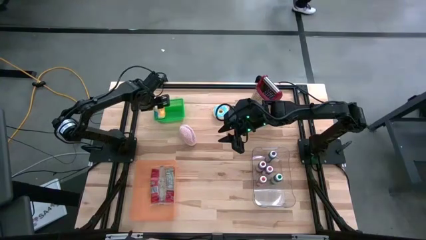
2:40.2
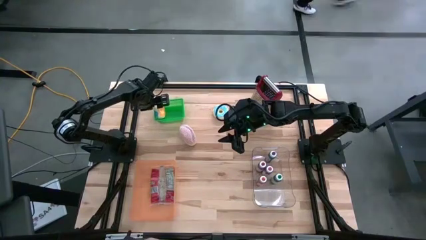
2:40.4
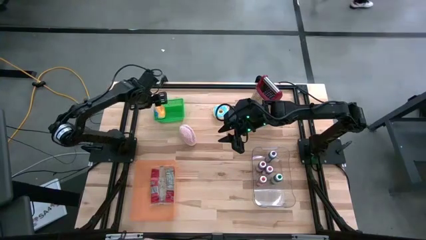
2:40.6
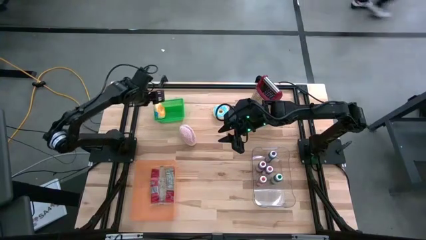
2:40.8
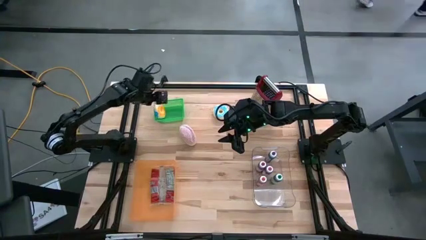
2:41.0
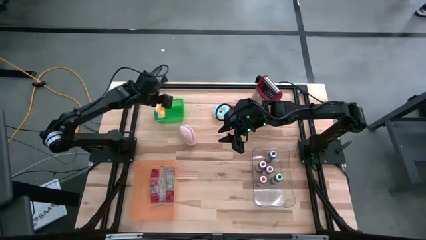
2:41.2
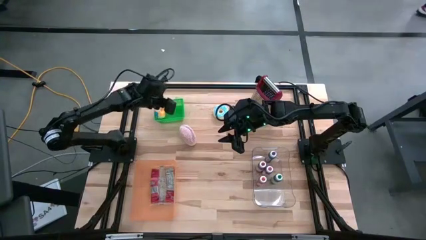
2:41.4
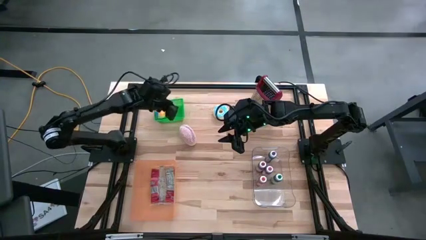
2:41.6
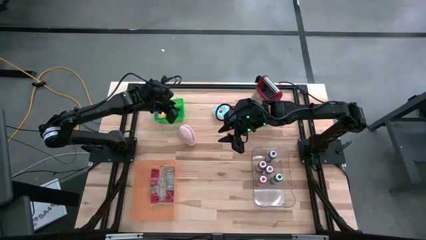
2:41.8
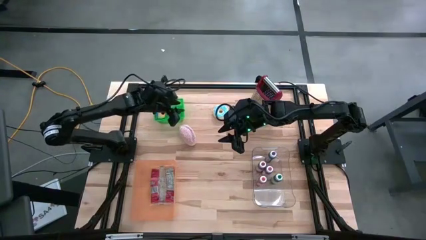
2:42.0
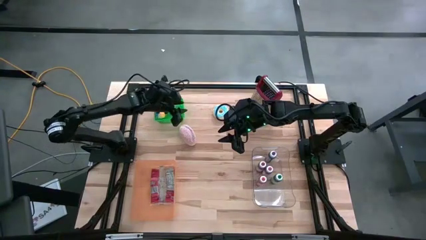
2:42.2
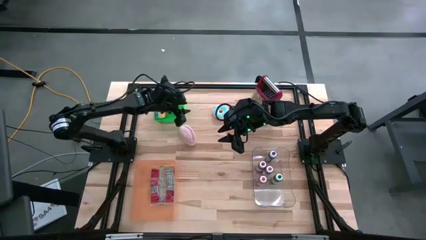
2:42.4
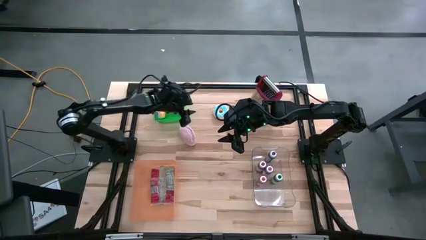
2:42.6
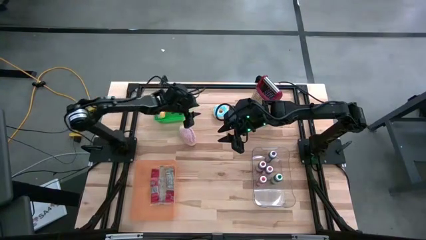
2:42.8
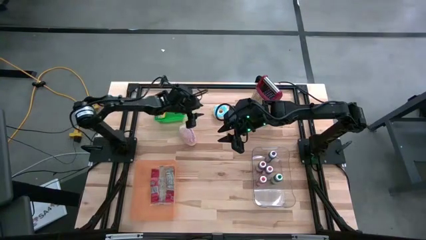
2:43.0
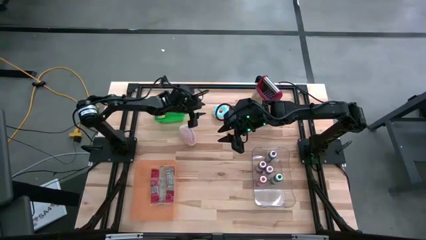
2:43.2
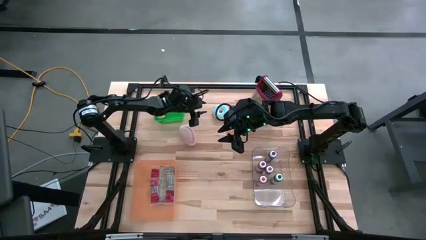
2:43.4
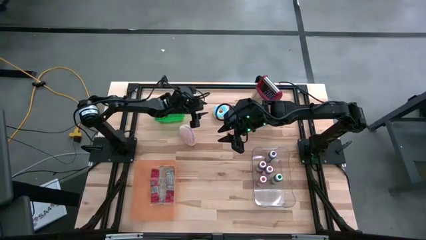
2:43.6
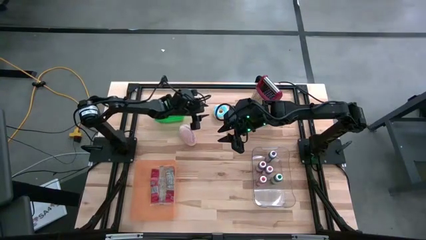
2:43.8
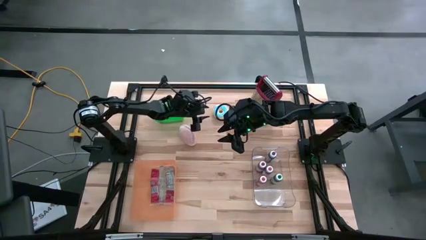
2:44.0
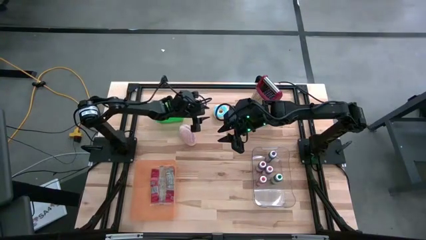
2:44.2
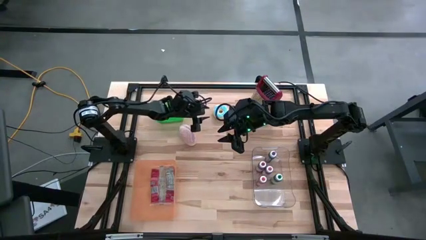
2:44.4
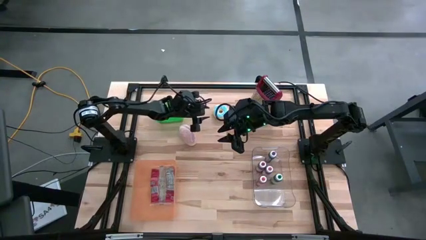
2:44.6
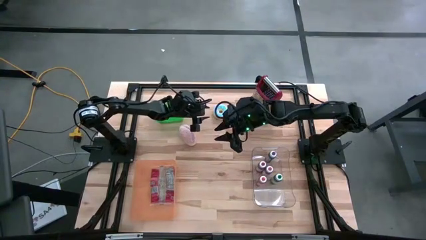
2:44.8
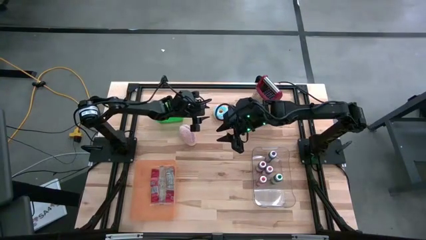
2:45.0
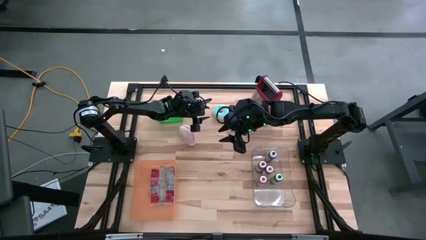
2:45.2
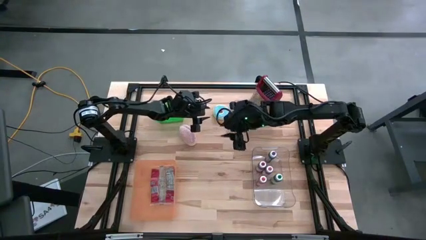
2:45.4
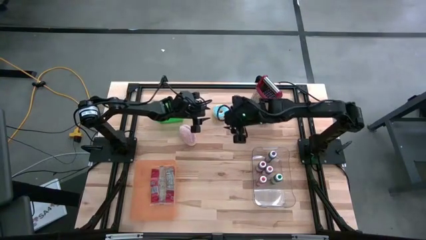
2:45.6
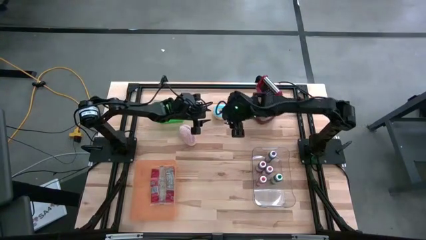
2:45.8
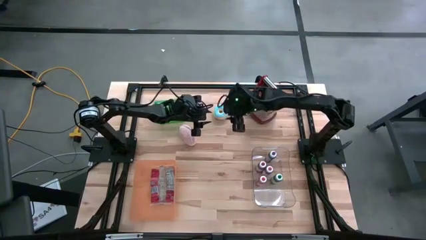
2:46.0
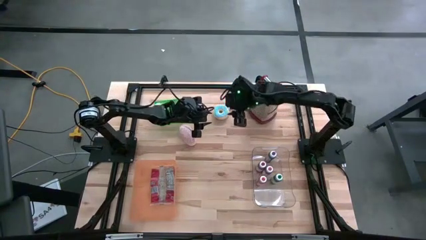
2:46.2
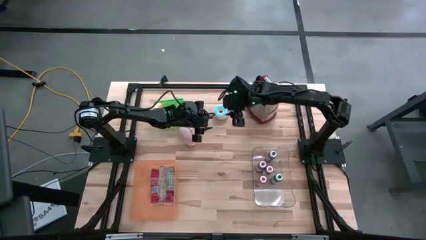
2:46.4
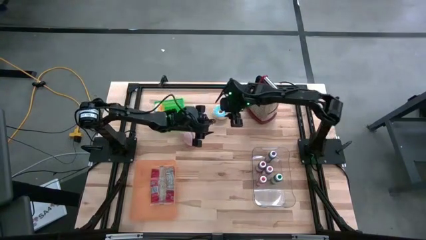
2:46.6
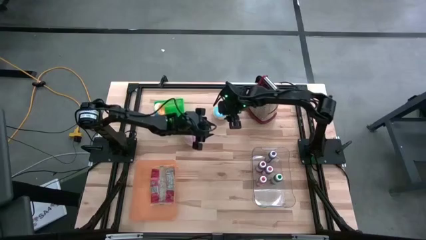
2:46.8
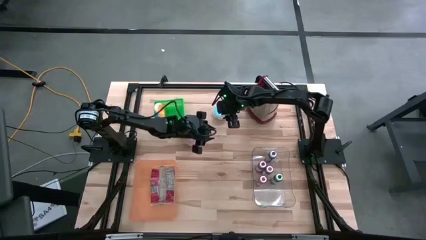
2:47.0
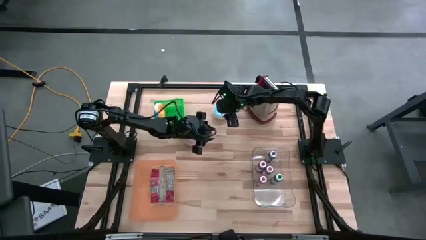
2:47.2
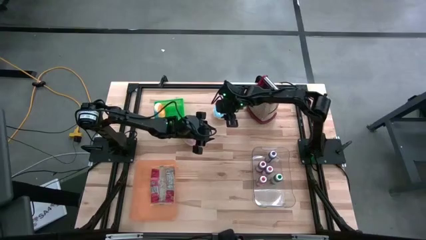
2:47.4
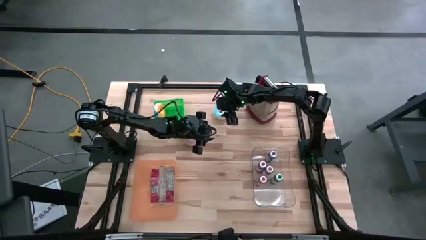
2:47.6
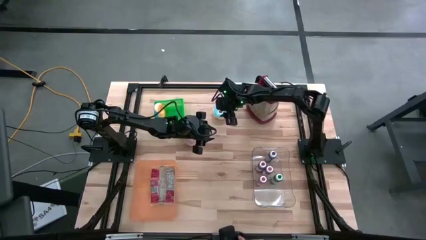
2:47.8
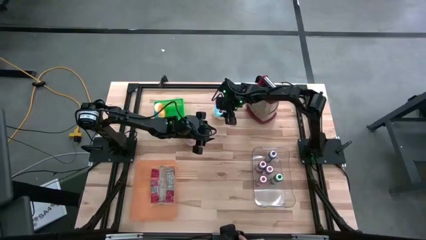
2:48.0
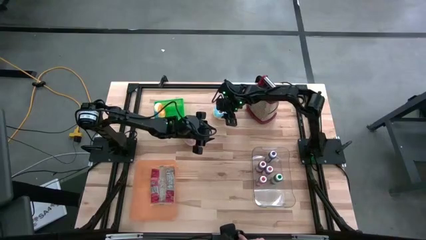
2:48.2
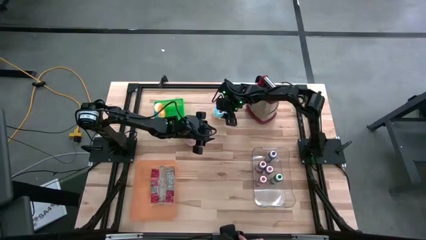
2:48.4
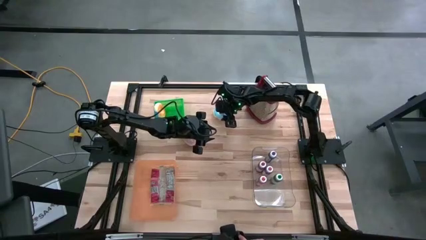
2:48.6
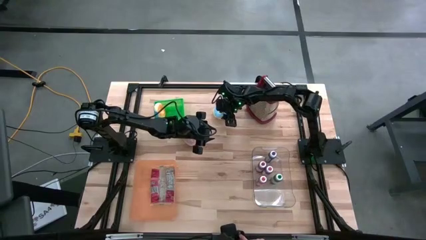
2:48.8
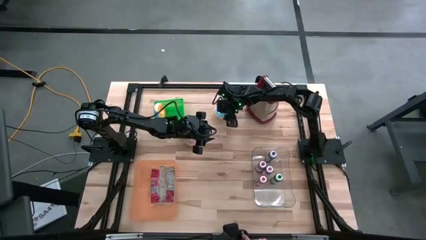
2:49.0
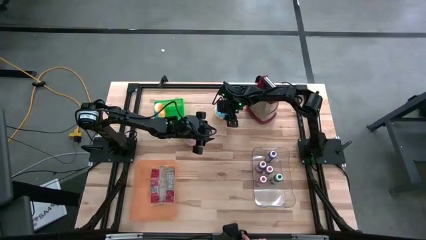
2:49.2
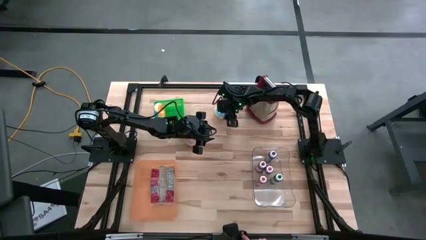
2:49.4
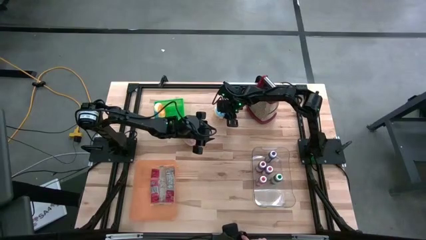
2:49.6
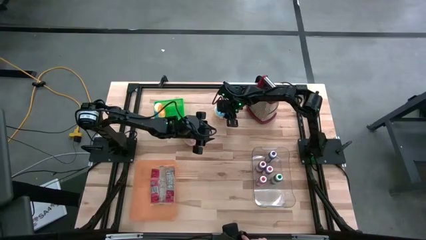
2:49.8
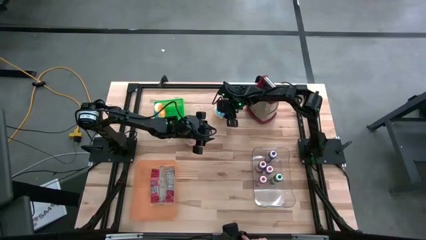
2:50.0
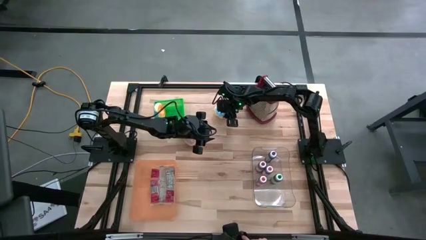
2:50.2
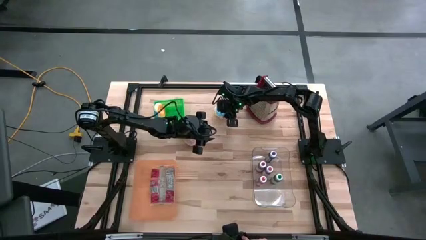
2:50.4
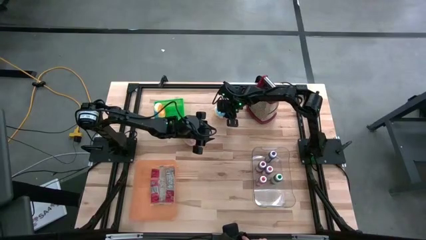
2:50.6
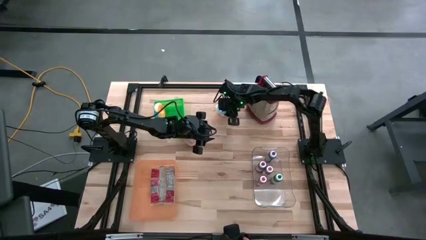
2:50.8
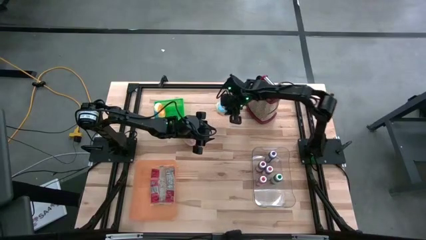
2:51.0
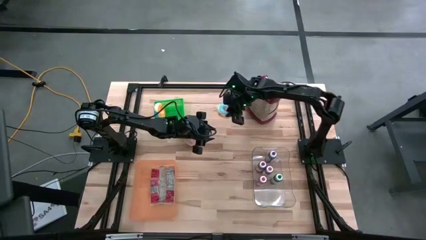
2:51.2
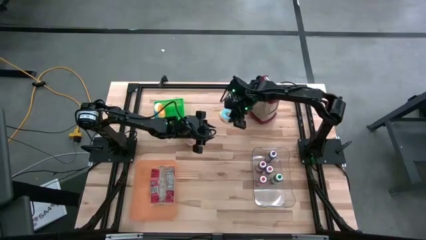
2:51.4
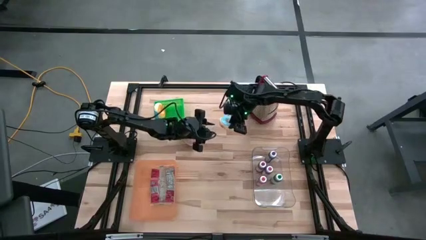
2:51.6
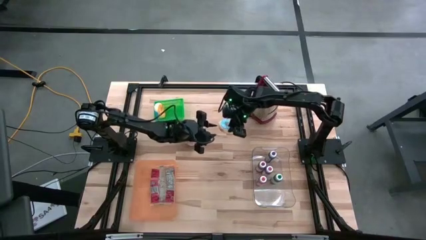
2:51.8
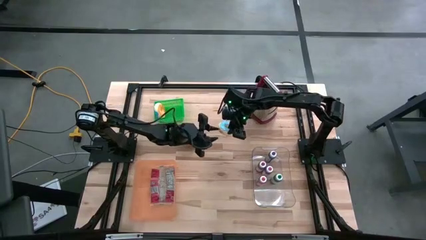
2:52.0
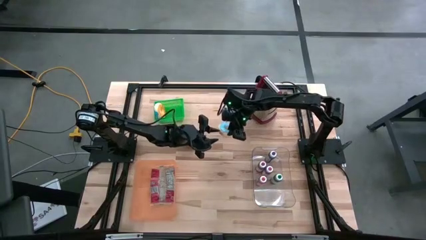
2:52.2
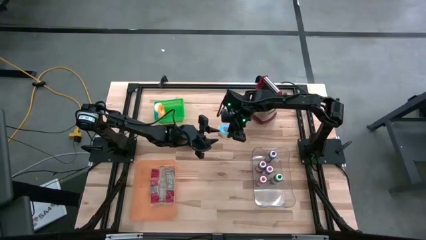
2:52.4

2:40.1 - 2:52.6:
Put the light blue donut into the green basket
